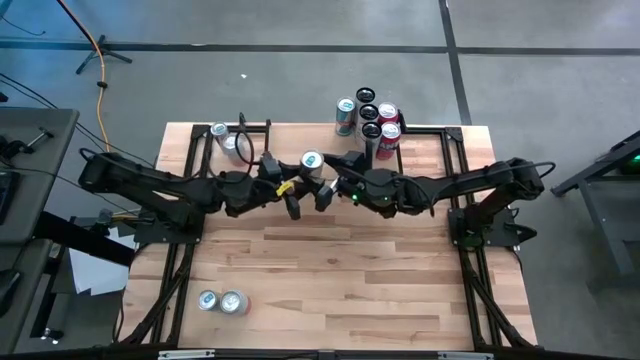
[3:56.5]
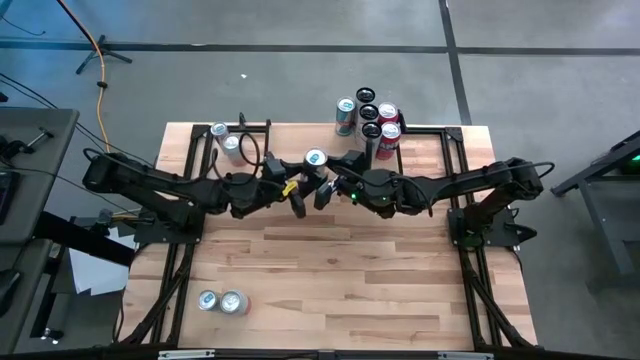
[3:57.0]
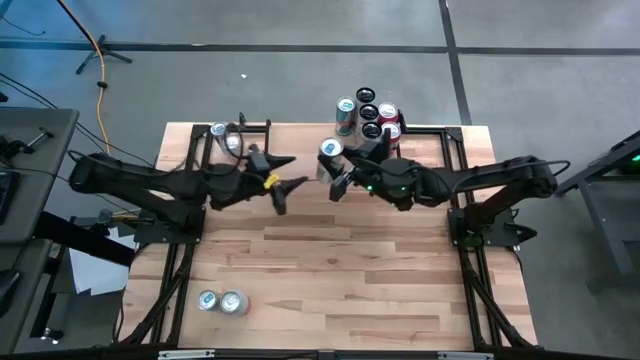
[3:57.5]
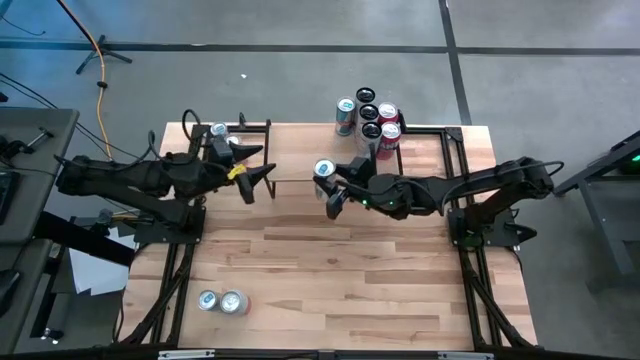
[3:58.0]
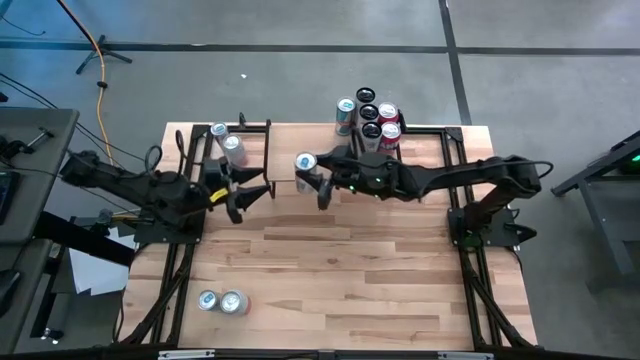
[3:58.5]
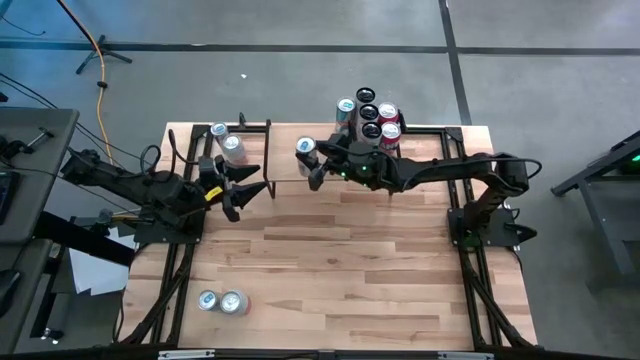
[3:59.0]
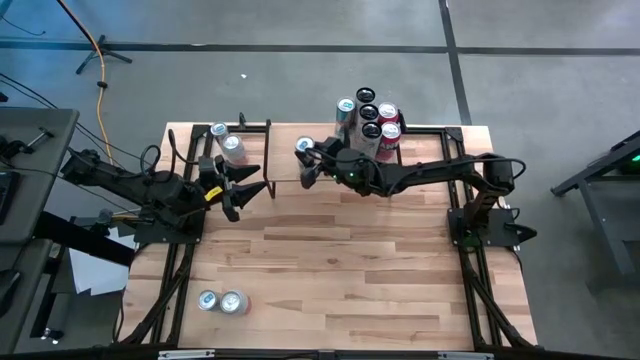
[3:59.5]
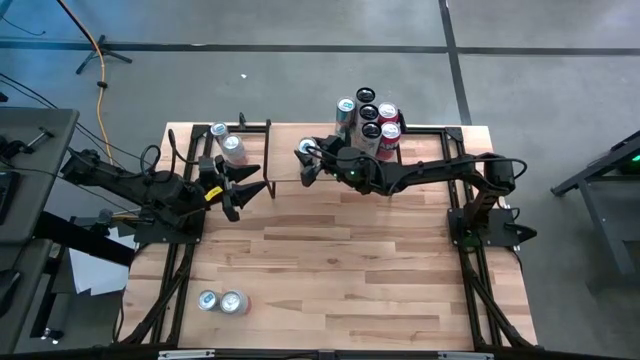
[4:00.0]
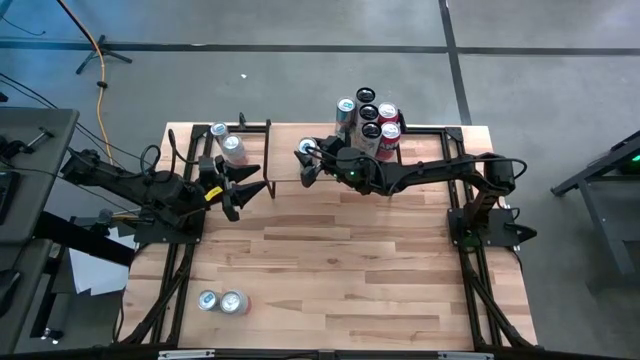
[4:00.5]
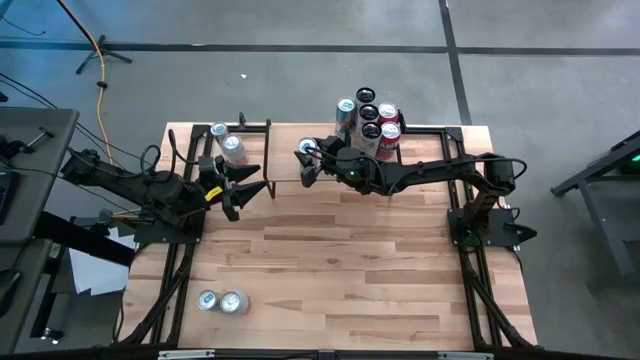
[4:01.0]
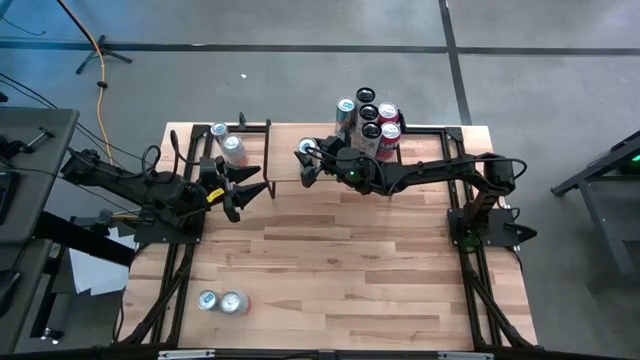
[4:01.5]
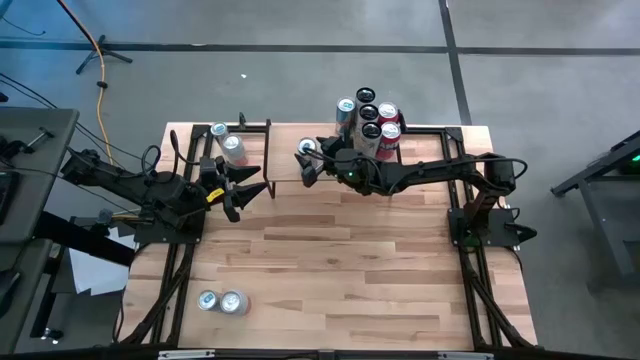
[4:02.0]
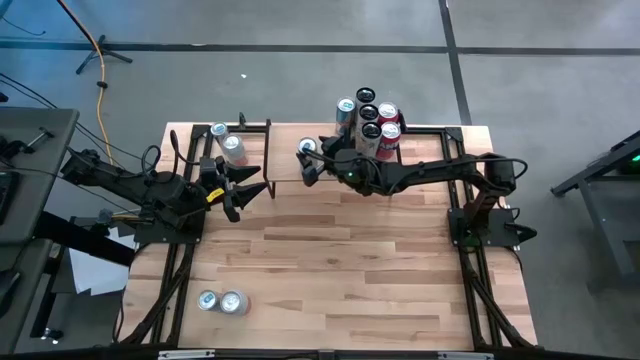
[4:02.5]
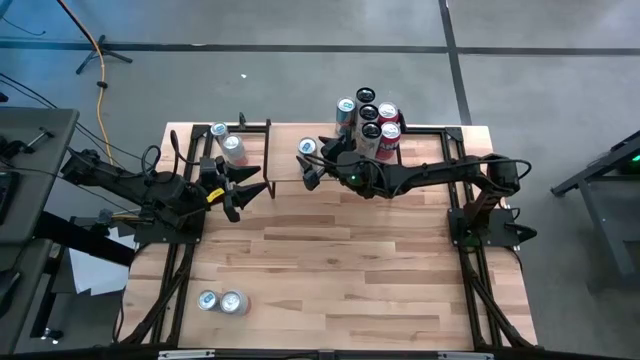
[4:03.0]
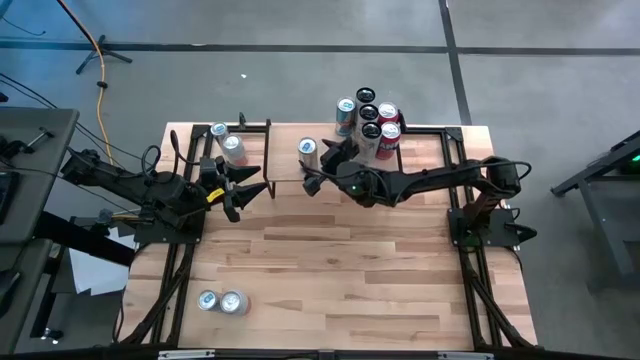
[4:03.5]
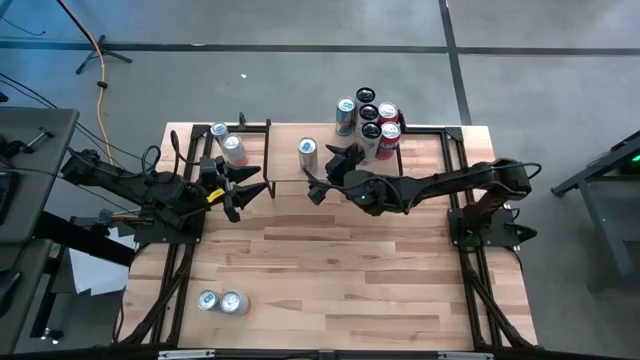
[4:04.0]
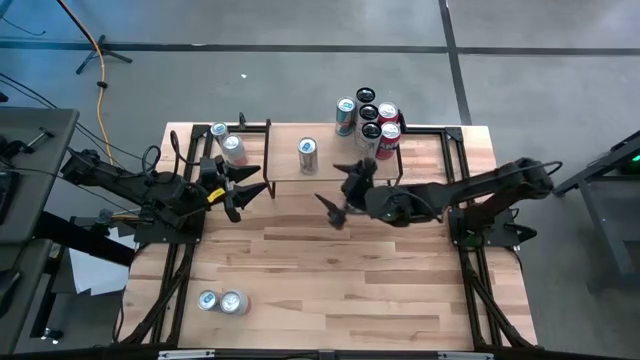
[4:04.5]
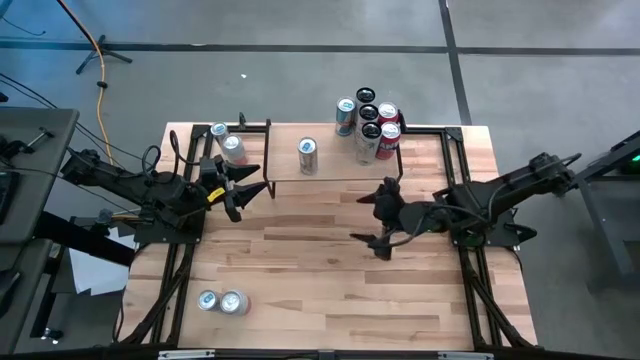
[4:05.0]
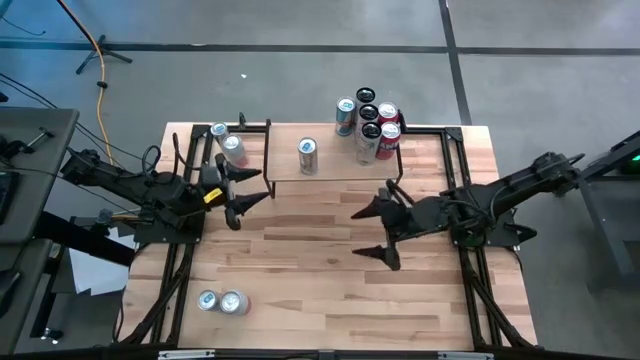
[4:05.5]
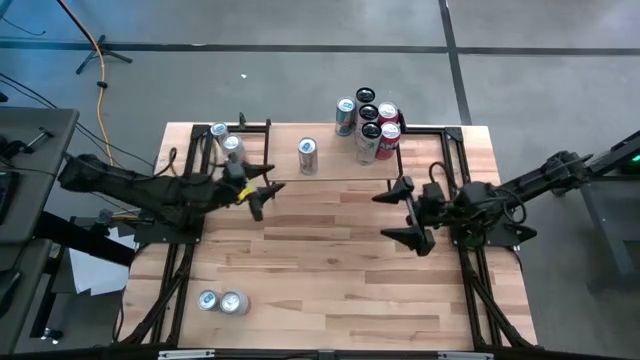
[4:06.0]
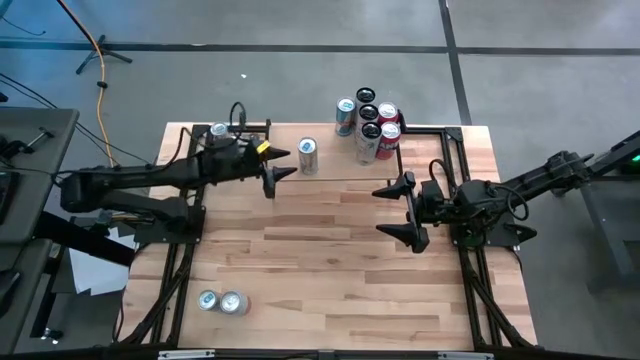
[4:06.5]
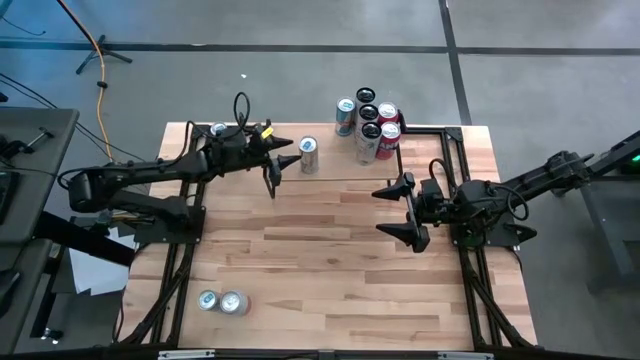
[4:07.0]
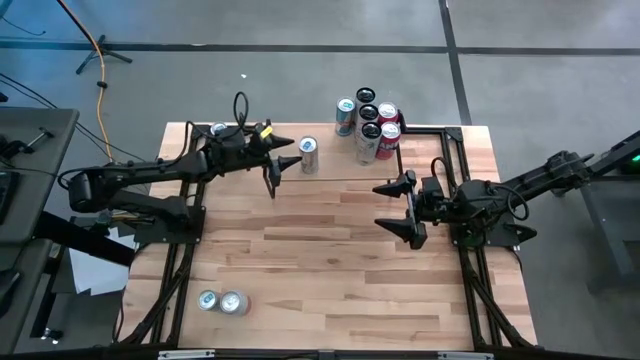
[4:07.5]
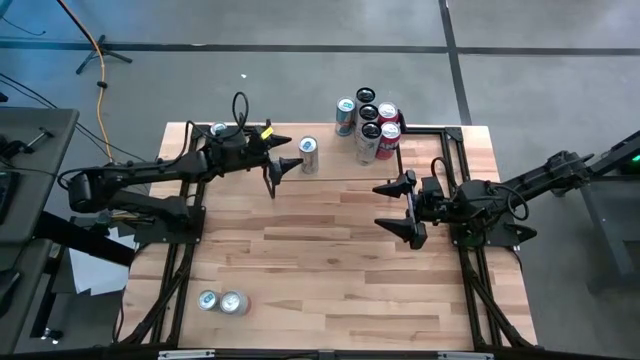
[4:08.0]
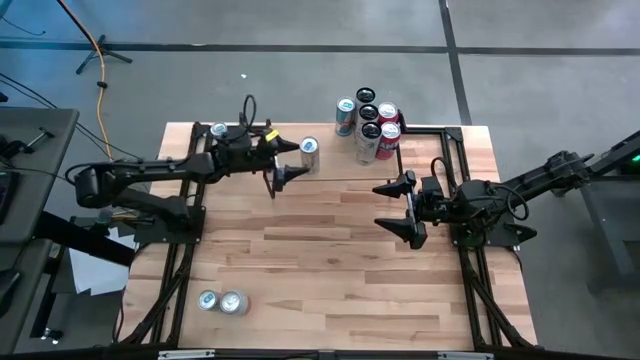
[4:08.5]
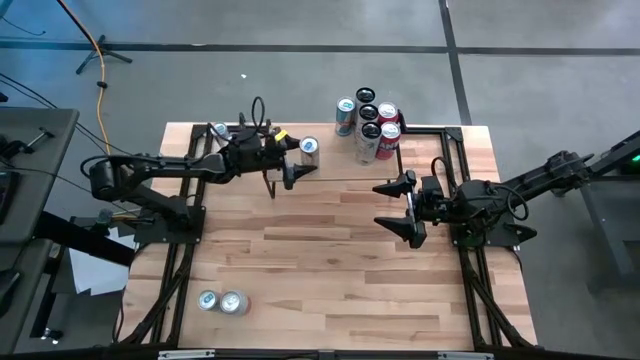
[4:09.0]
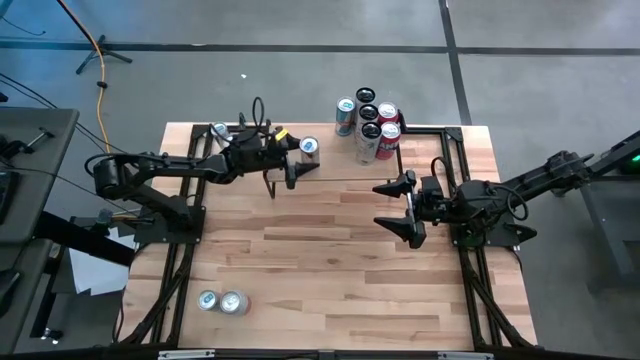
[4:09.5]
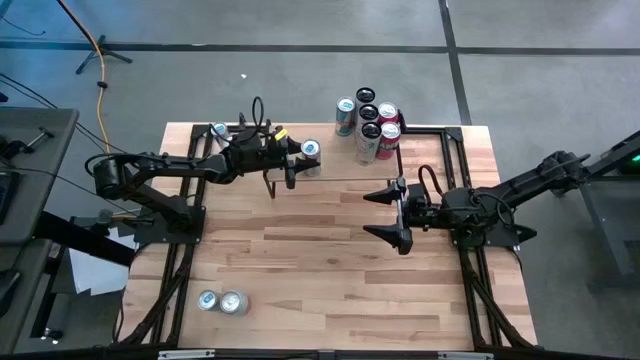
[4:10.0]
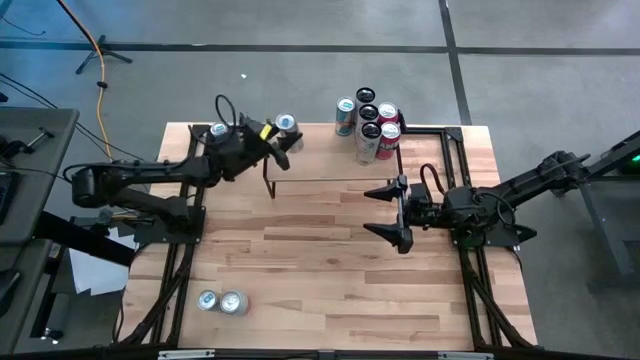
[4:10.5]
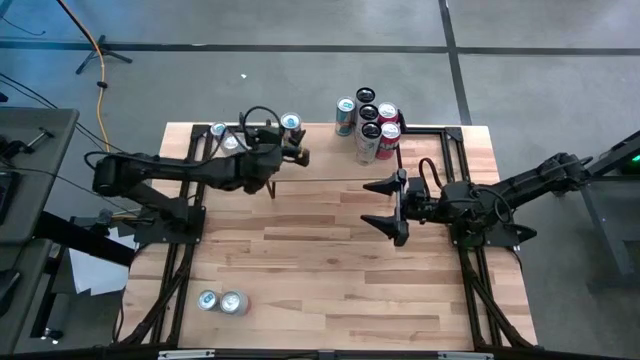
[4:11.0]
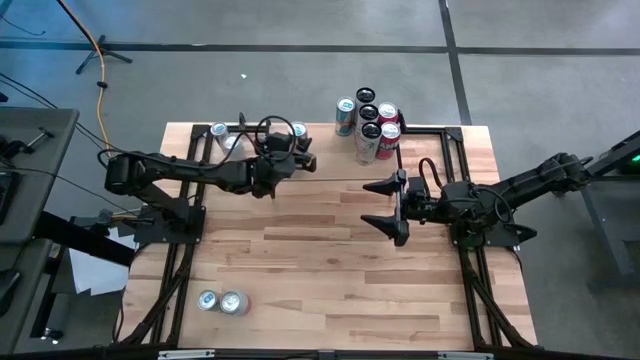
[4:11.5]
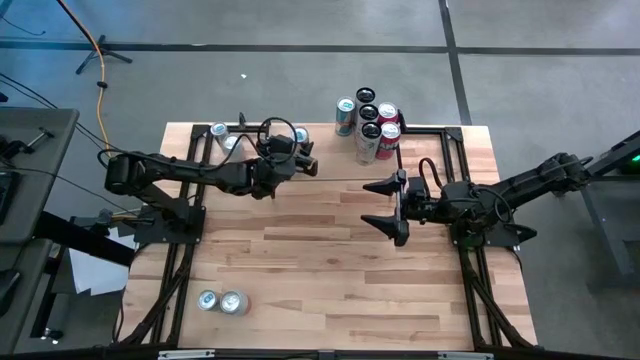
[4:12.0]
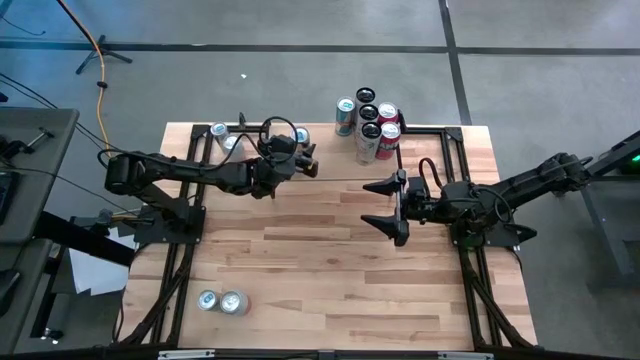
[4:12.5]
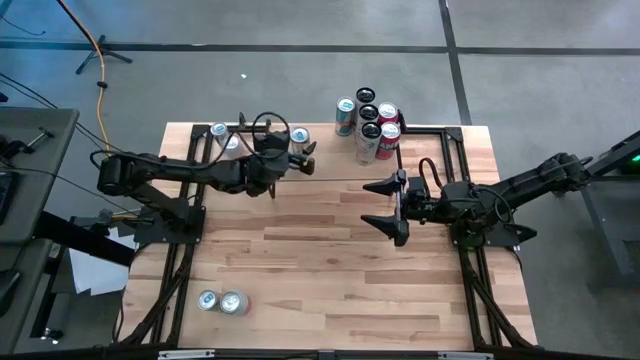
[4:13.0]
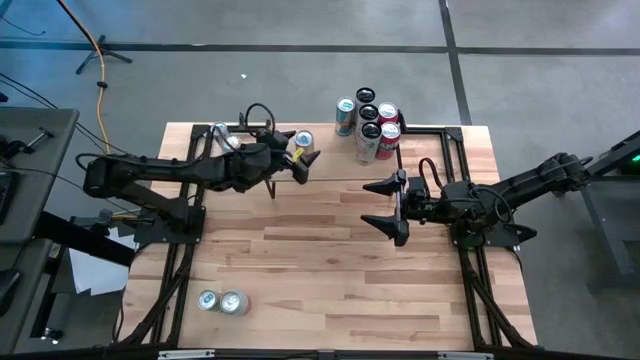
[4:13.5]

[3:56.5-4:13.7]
Task: Place canned beverage on shelf
Put the top right blue soda can on the shelf aligned with the blue soda can

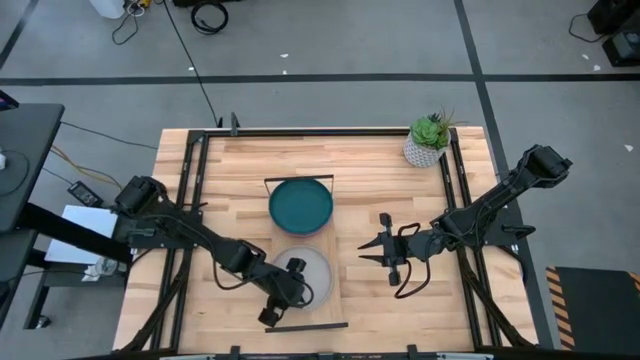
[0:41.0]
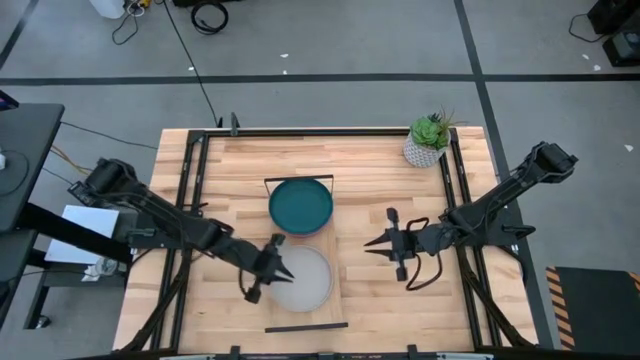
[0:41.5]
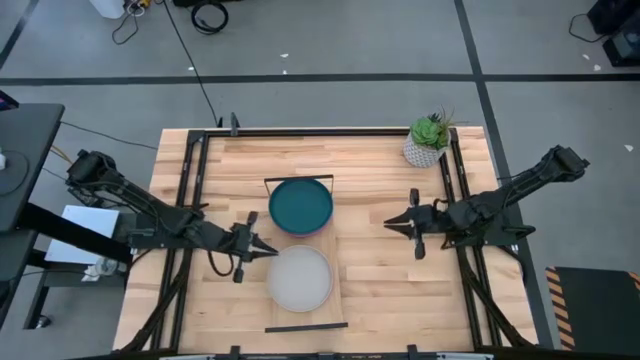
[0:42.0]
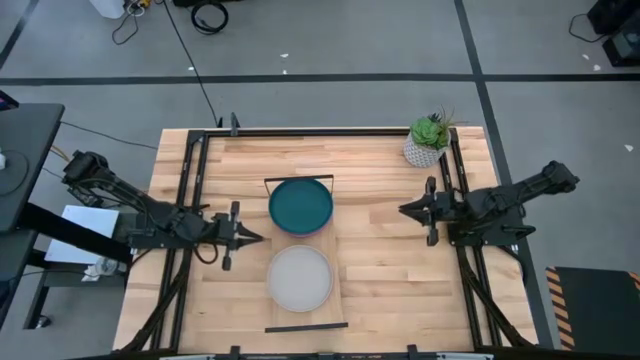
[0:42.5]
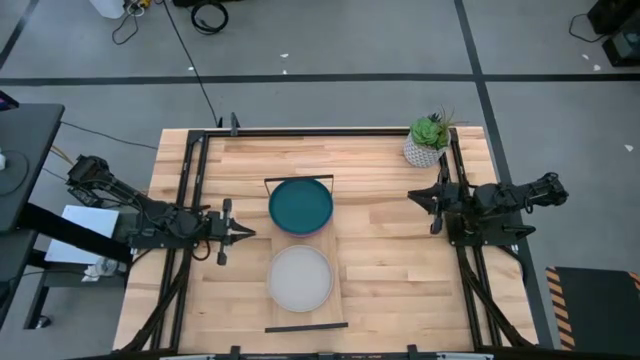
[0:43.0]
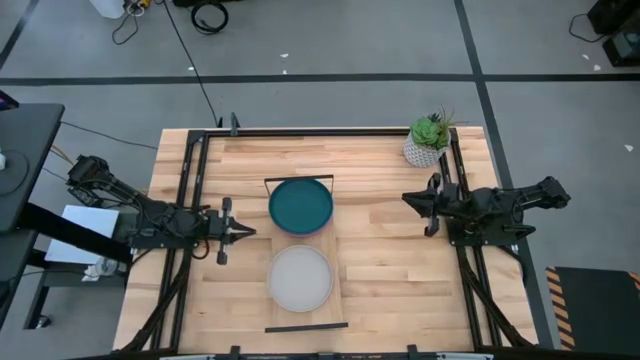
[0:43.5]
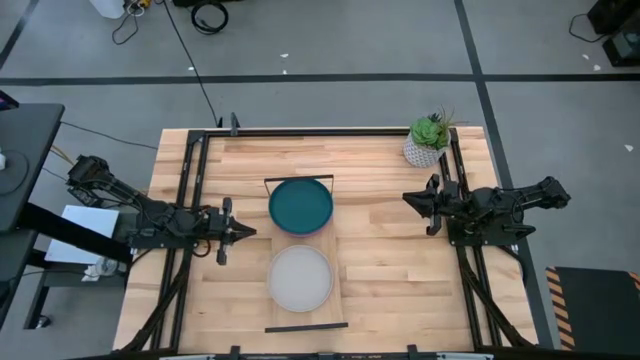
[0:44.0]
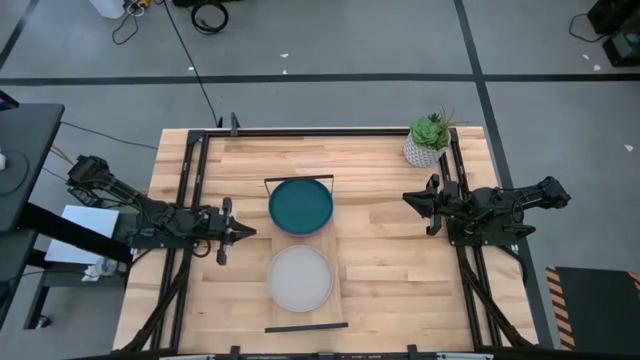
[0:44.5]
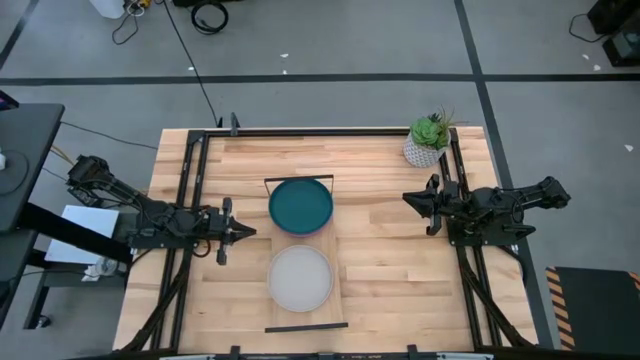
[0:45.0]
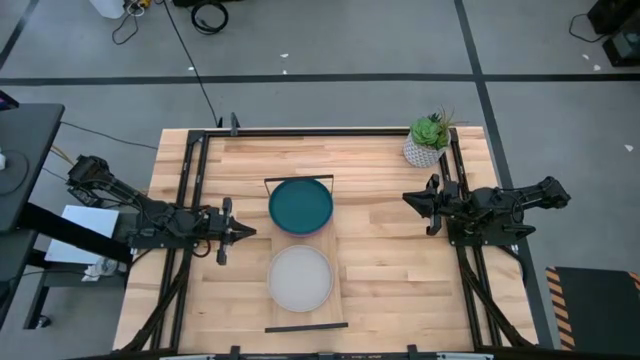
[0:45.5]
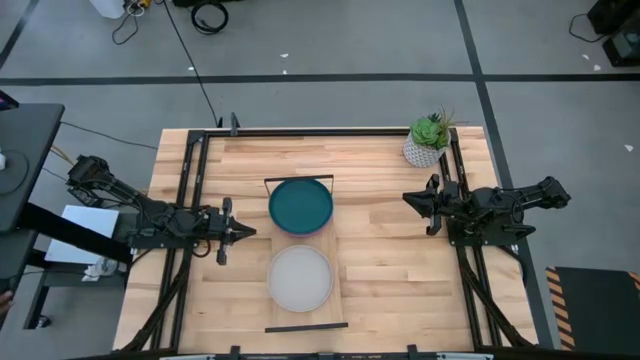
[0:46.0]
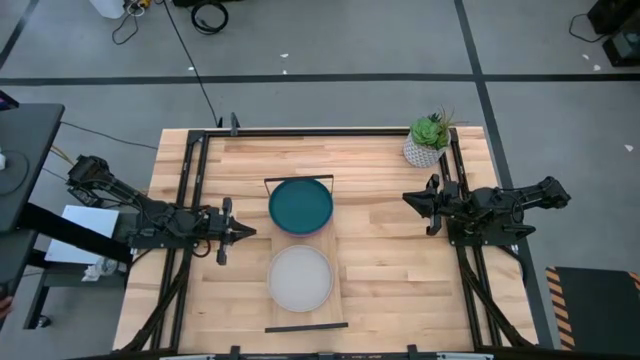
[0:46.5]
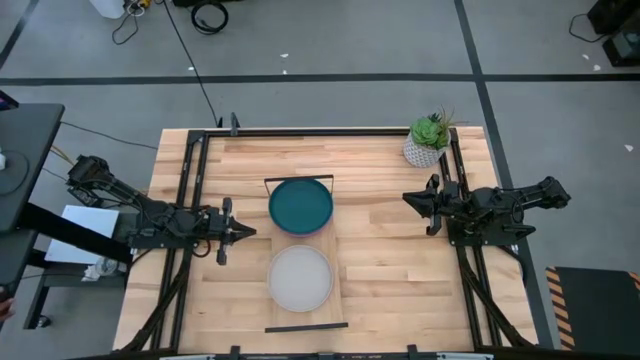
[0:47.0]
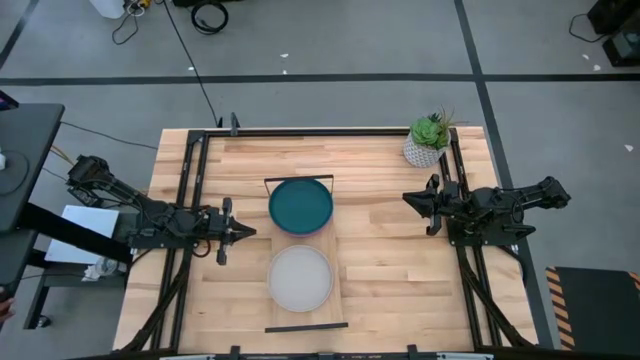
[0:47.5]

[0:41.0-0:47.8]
Task: Place and stack plates onto a shelf
Return to Home Position
